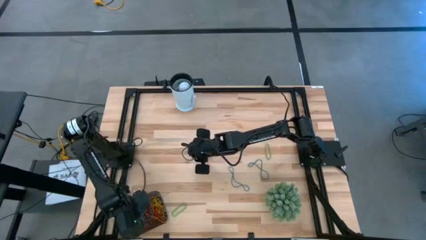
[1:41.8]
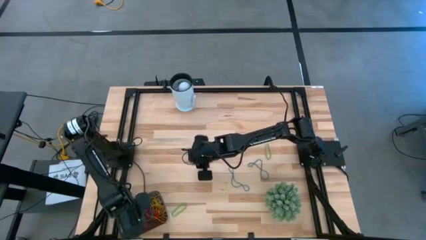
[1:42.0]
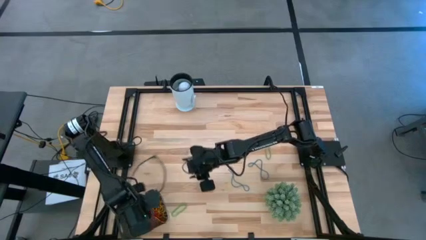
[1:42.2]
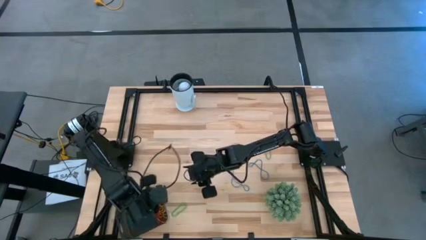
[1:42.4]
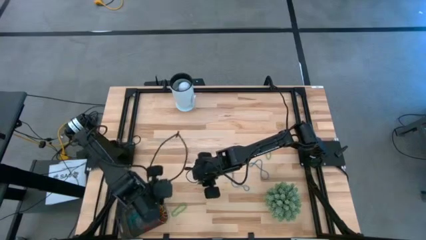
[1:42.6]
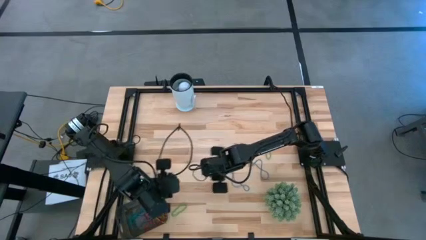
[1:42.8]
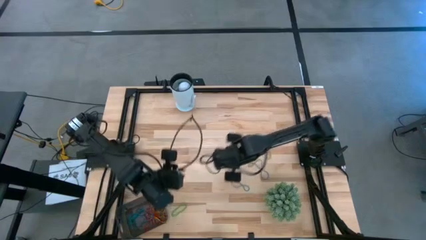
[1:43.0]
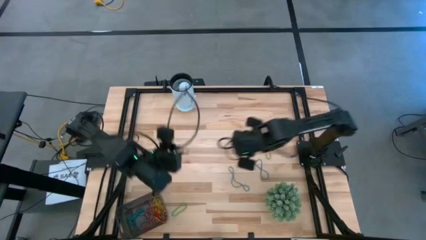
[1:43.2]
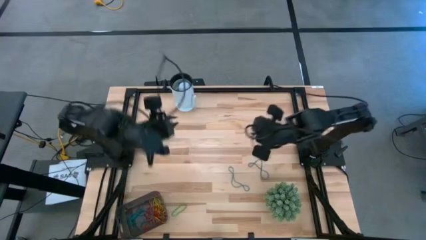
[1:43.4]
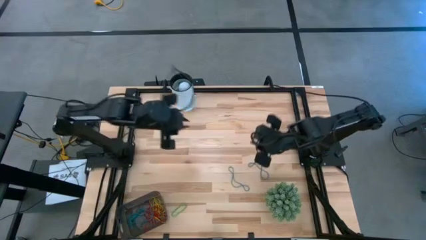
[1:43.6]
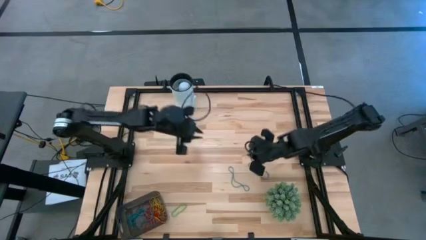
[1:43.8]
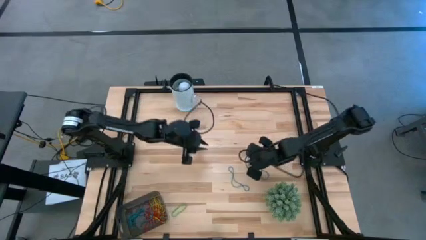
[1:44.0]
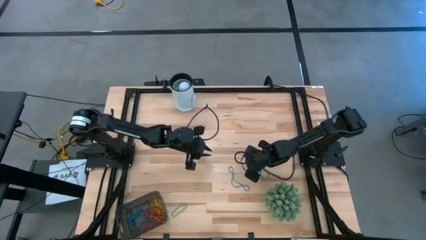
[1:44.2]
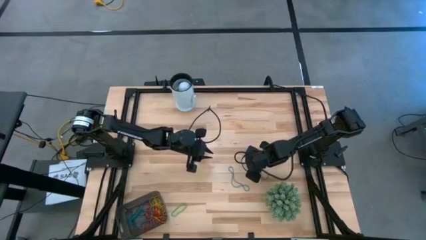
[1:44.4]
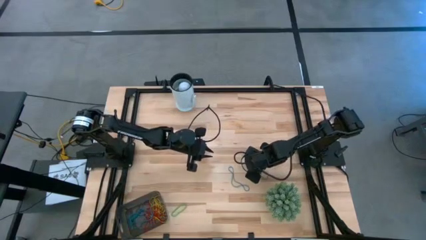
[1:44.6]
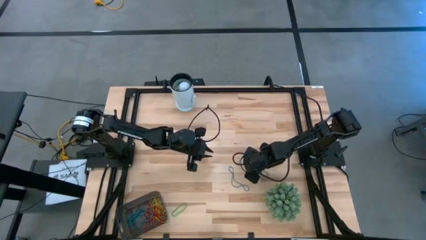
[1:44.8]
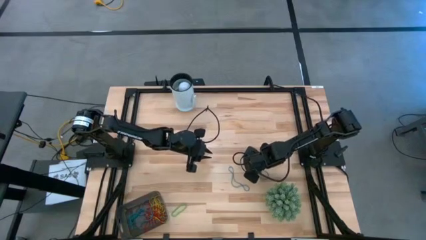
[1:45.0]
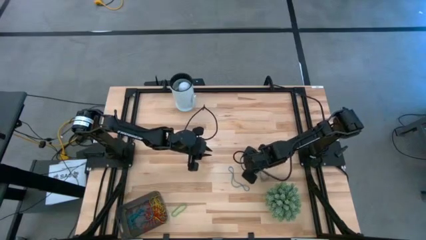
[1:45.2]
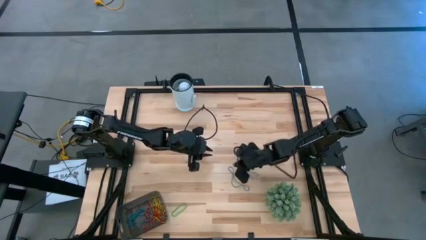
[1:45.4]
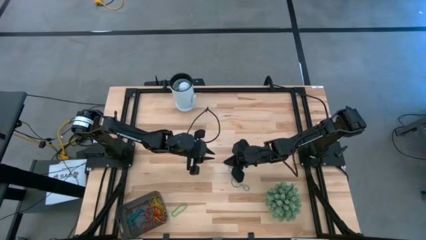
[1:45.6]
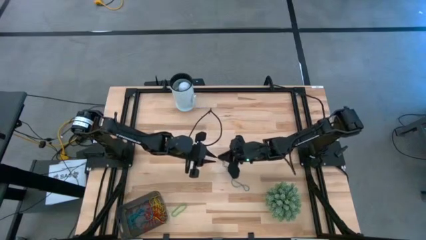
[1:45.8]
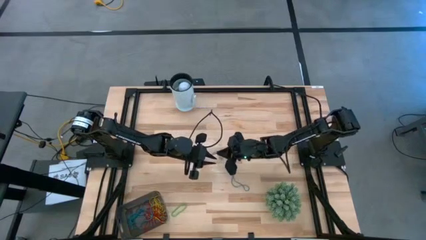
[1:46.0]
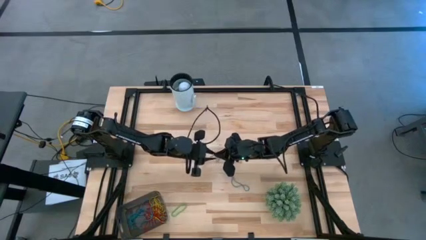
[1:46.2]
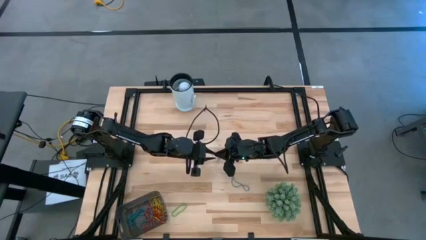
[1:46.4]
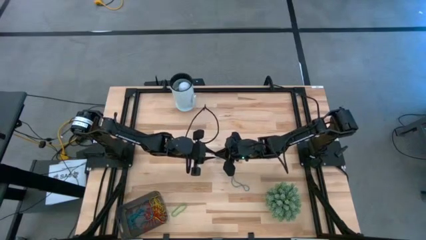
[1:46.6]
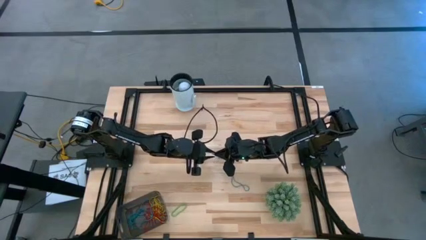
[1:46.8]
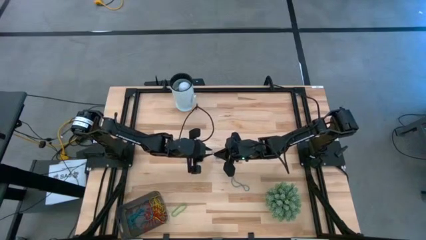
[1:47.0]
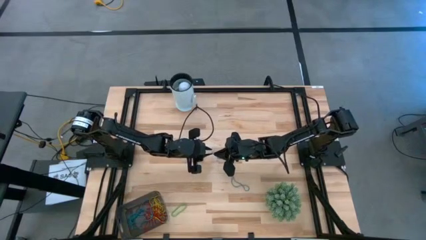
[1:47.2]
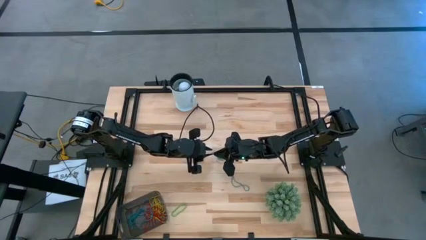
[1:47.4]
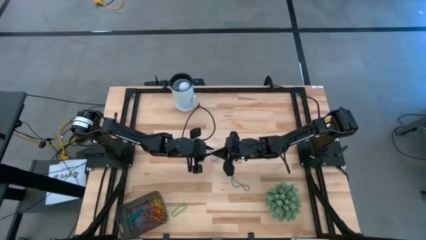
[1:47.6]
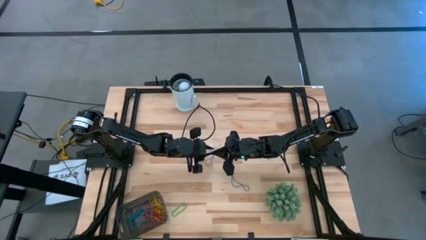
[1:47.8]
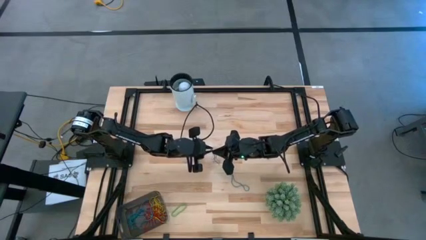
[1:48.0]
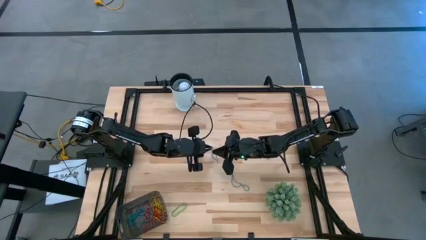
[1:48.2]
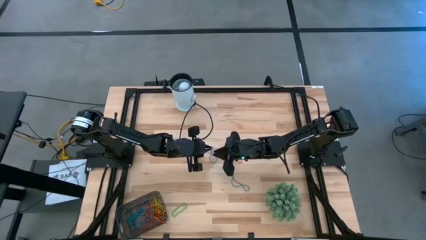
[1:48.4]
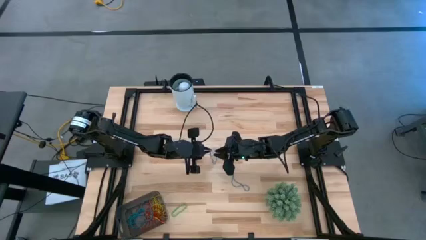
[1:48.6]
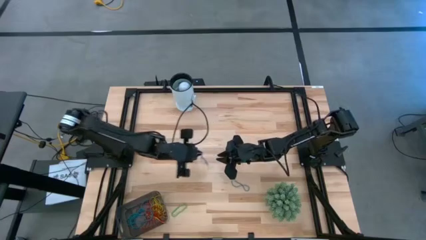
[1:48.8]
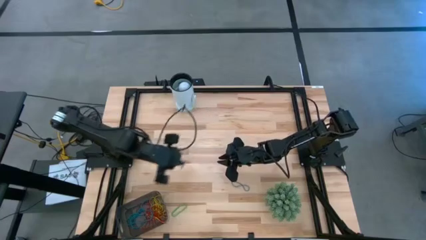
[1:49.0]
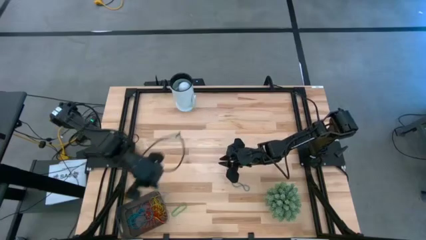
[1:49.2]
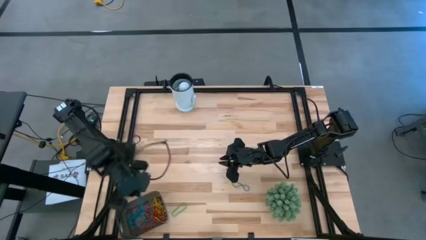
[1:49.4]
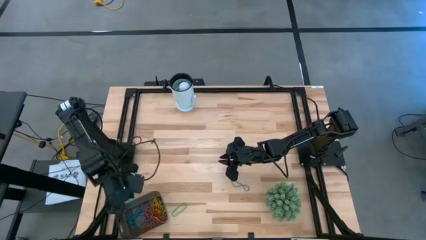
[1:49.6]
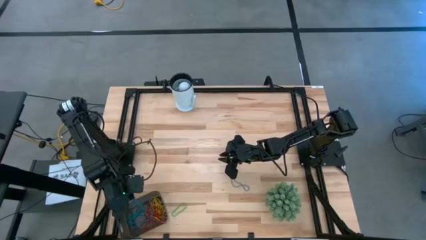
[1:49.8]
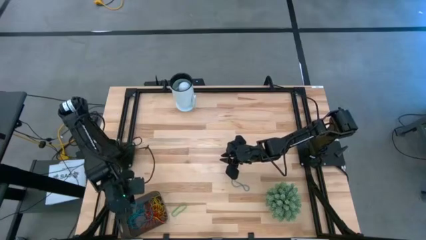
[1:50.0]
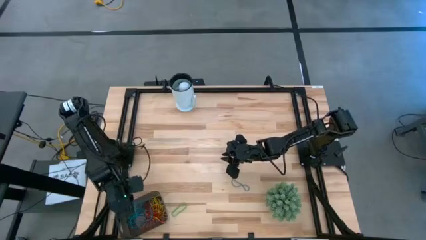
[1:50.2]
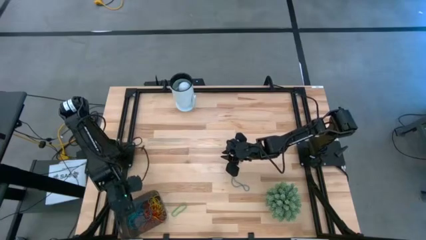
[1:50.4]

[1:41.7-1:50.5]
Task: Pick and place items into bin
Put the blue rubber band into the black bin

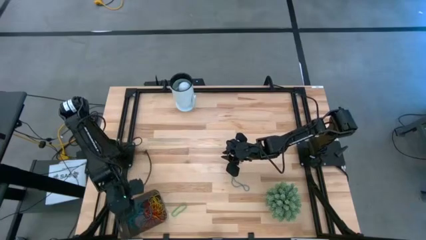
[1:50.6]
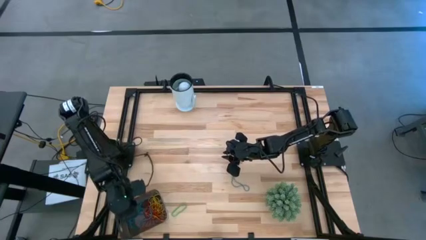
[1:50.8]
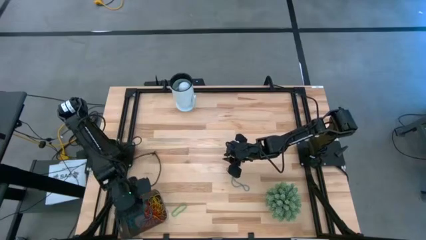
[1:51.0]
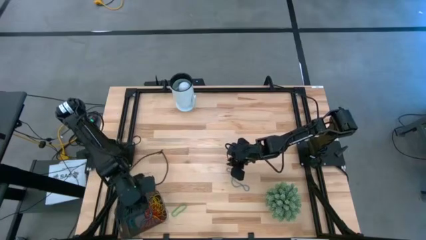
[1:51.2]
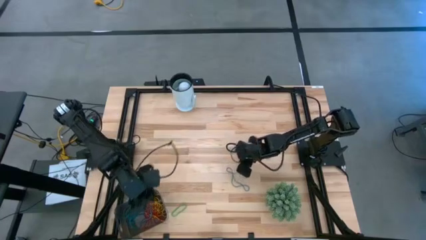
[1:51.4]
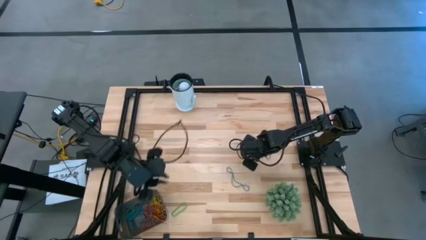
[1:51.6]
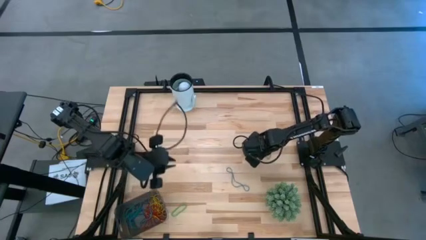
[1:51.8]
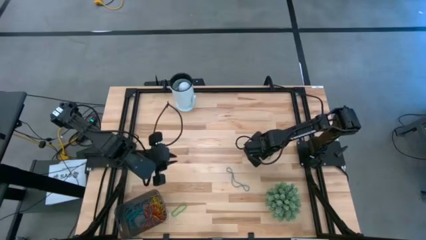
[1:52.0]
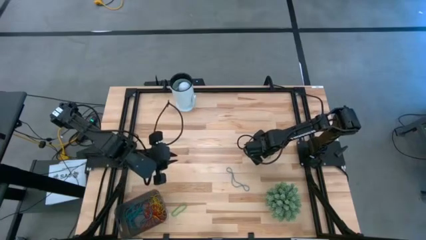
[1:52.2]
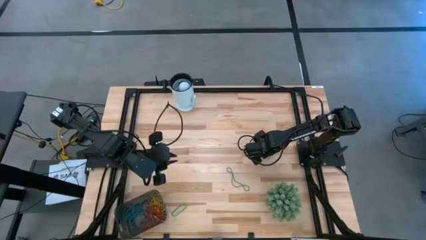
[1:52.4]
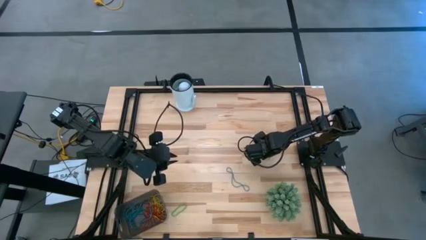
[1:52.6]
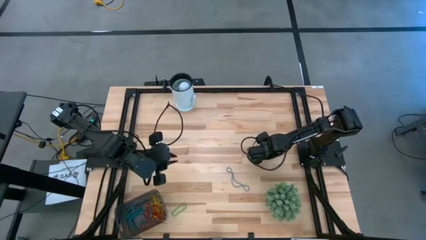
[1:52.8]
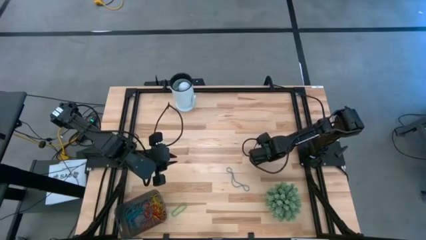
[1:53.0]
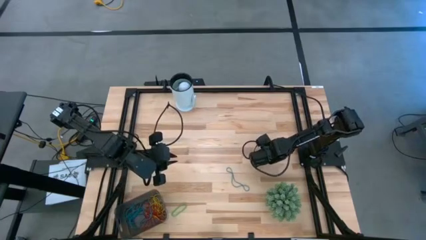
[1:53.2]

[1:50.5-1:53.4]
Put the green rubber band into the black bin

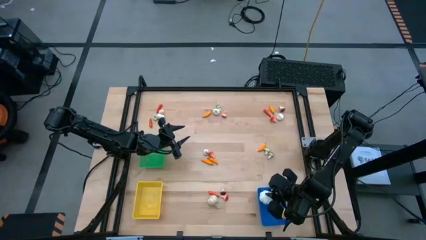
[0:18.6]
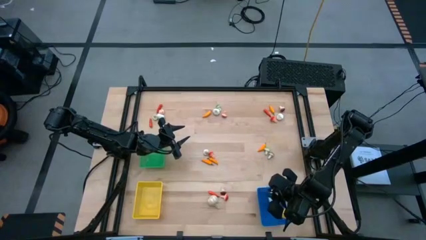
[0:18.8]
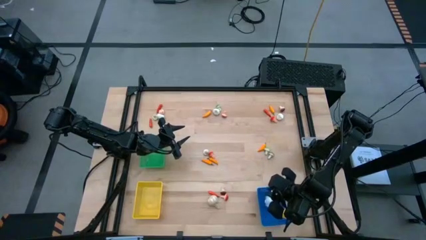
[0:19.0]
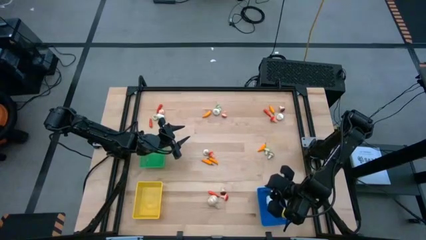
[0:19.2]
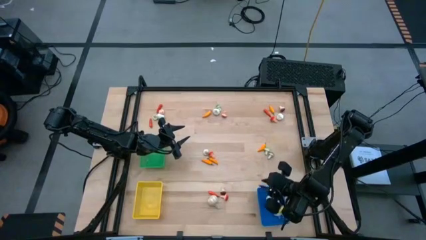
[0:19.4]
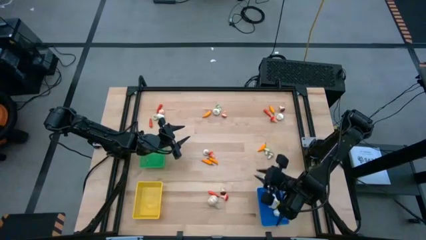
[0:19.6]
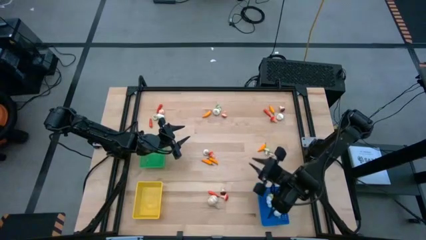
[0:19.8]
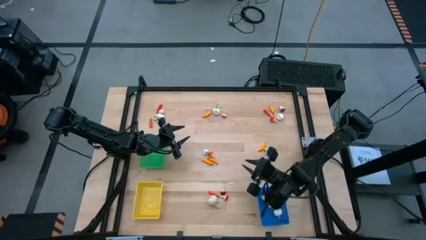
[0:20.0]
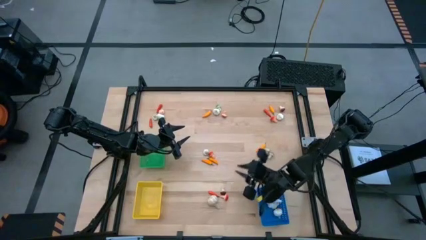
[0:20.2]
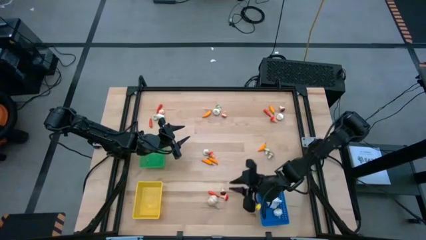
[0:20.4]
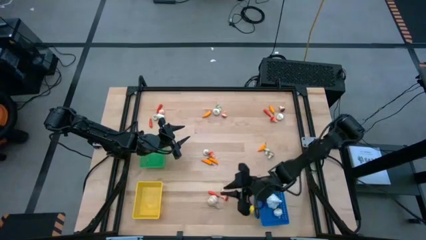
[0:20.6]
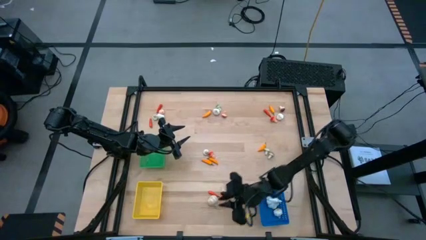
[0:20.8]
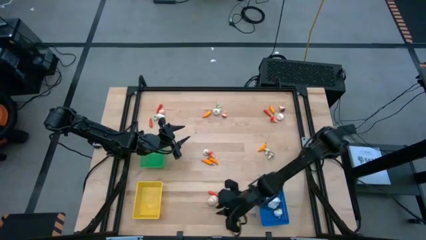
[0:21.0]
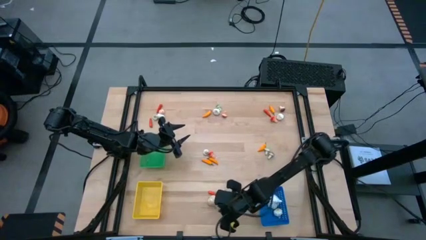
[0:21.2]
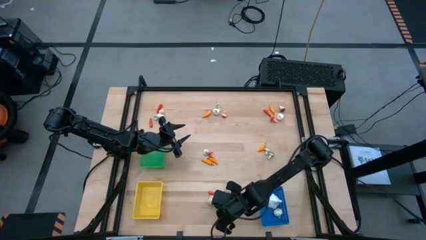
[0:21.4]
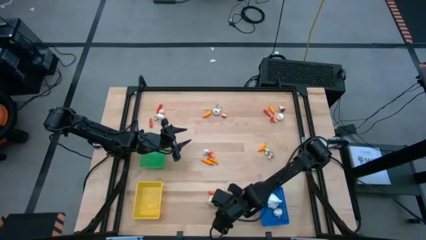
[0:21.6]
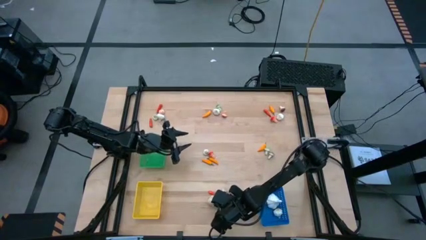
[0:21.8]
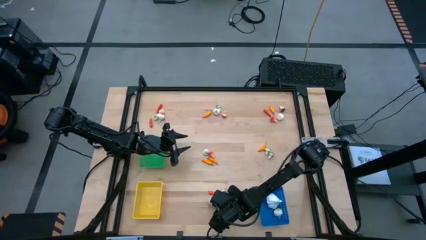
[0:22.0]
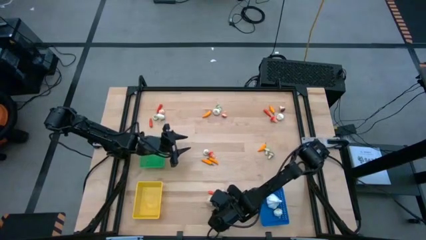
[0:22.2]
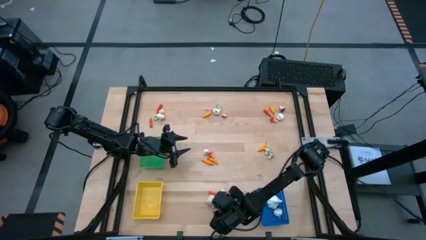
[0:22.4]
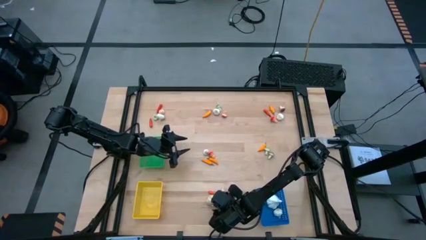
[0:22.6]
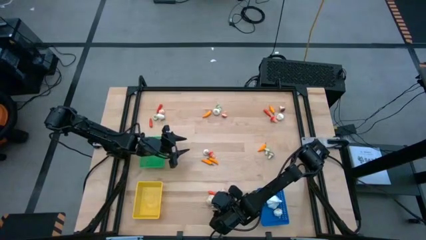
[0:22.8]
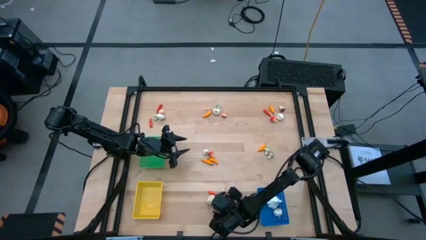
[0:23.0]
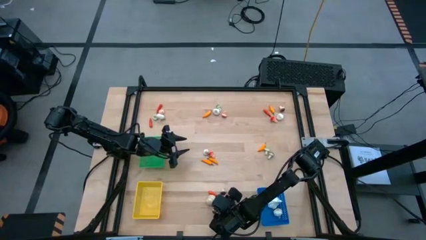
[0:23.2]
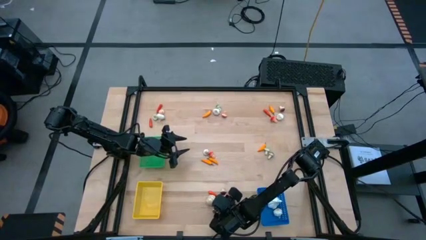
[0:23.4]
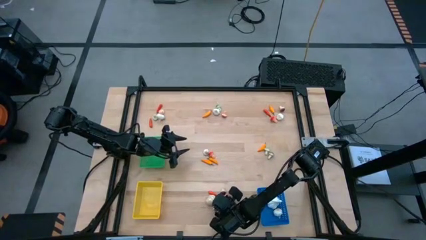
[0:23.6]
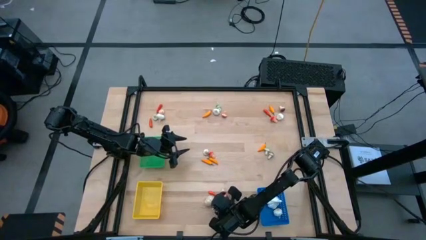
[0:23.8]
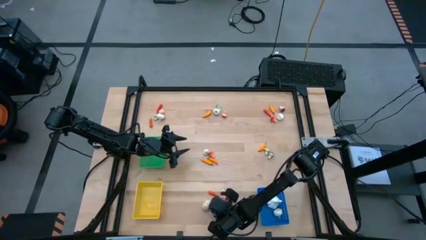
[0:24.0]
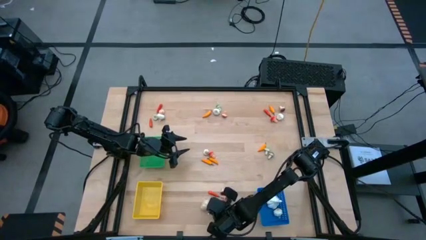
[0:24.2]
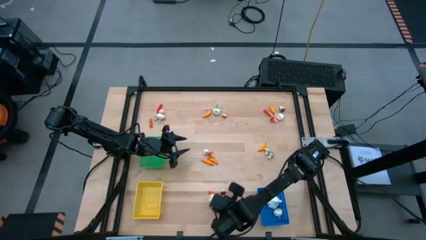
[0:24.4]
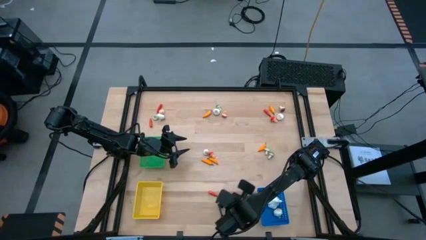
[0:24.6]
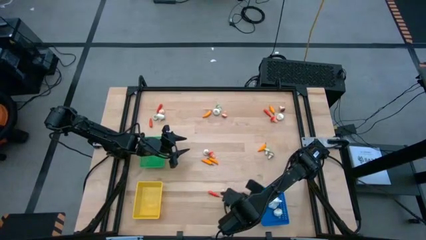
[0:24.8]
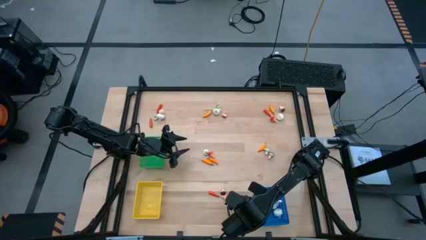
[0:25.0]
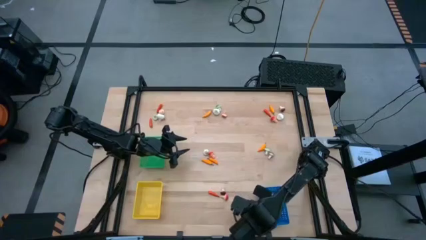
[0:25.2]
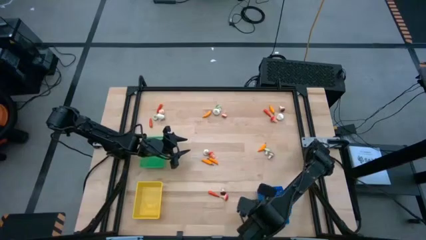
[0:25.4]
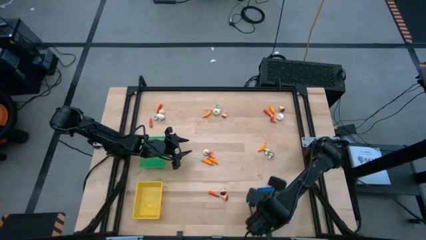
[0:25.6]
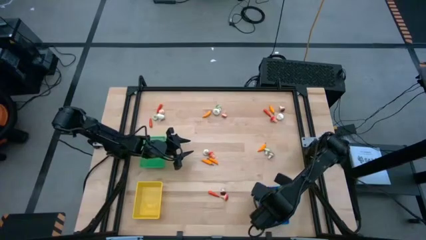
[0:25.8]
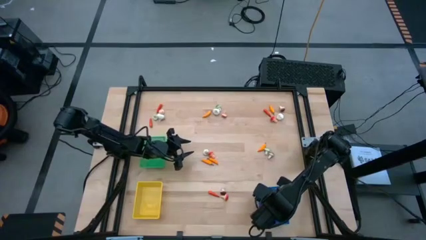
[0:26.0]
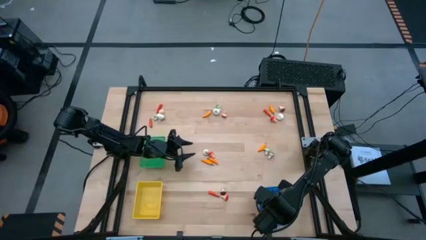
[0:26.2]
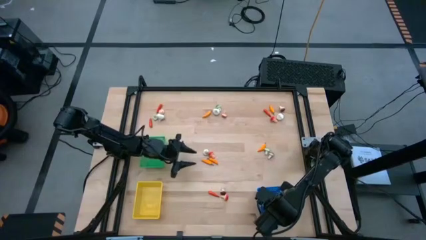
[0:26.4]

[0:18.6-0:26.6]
Task: Sort produce into baskets
Put the garlic into the blue bin
